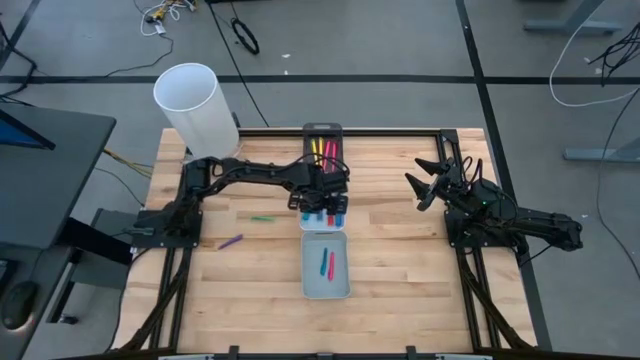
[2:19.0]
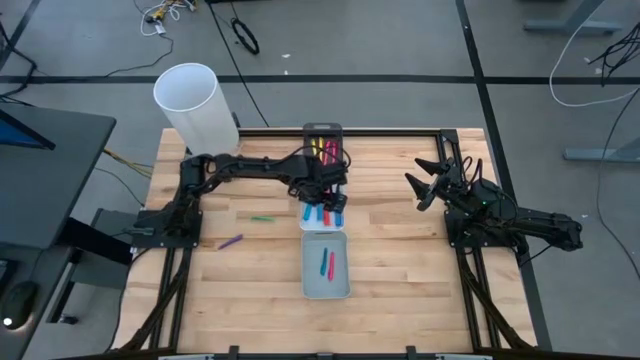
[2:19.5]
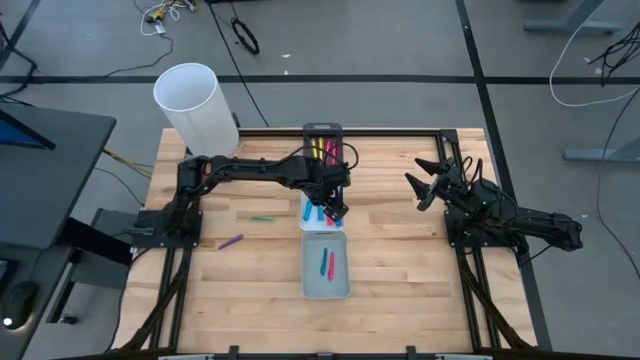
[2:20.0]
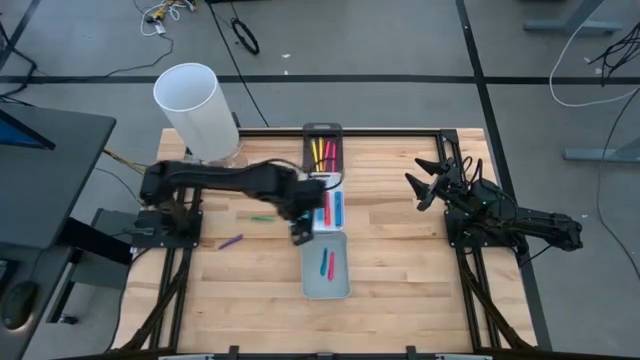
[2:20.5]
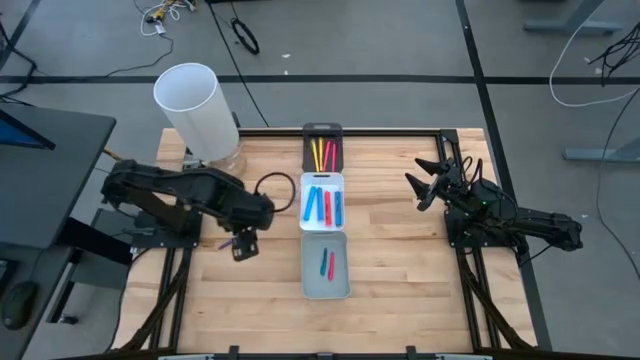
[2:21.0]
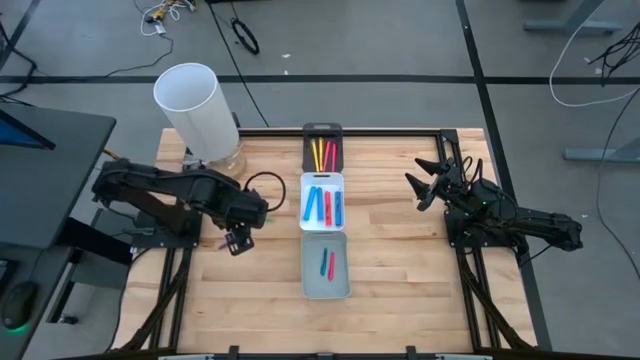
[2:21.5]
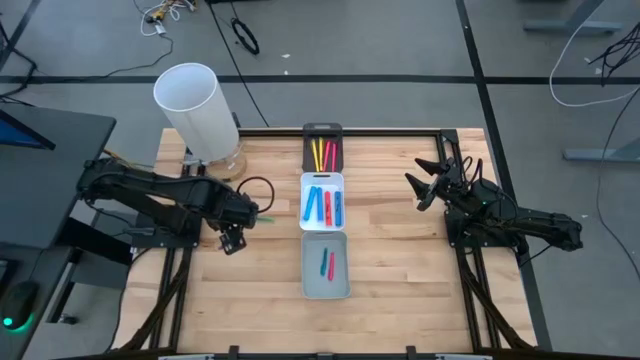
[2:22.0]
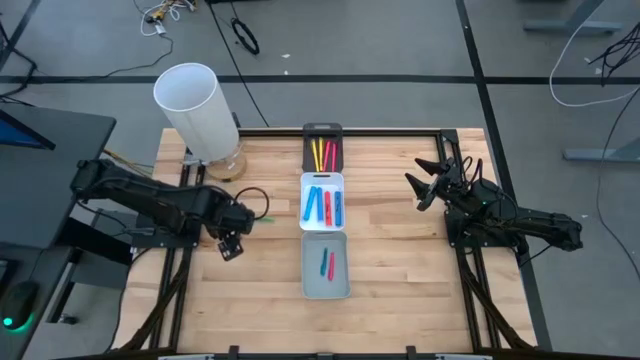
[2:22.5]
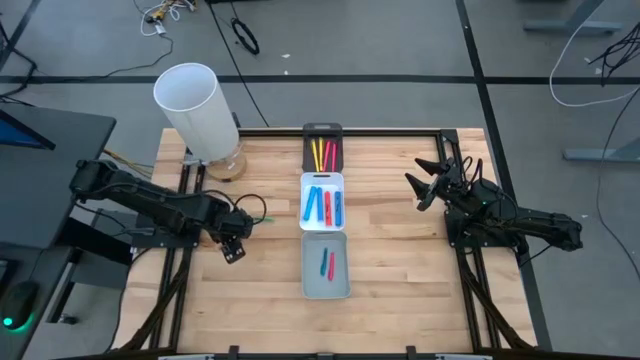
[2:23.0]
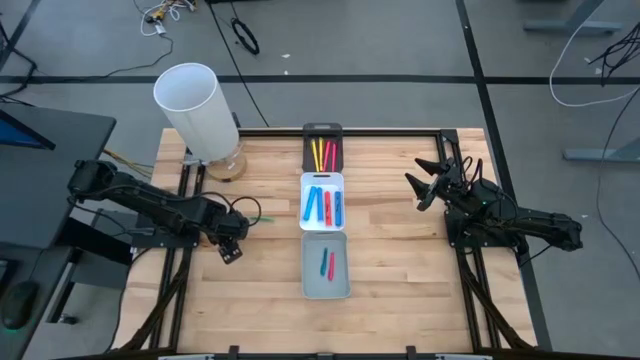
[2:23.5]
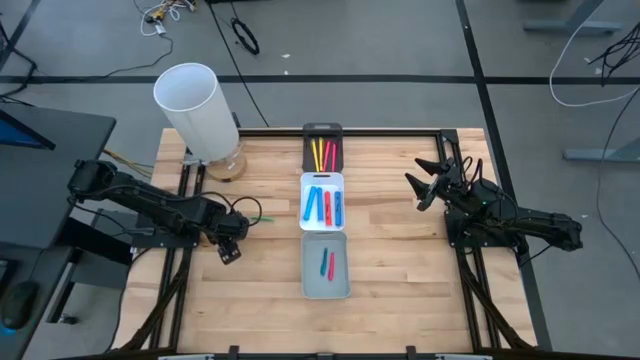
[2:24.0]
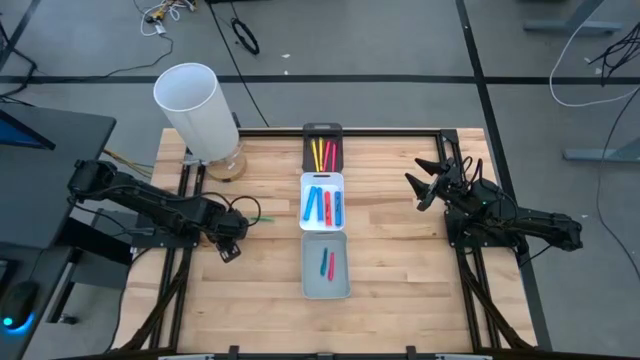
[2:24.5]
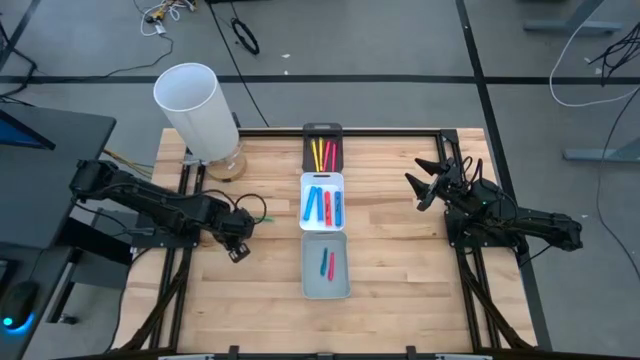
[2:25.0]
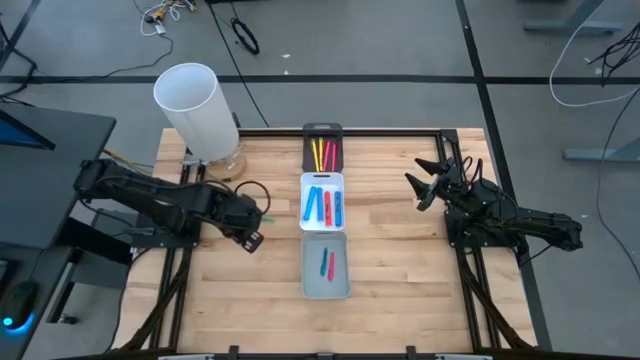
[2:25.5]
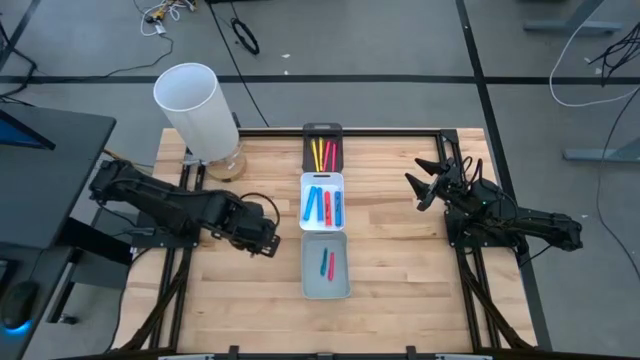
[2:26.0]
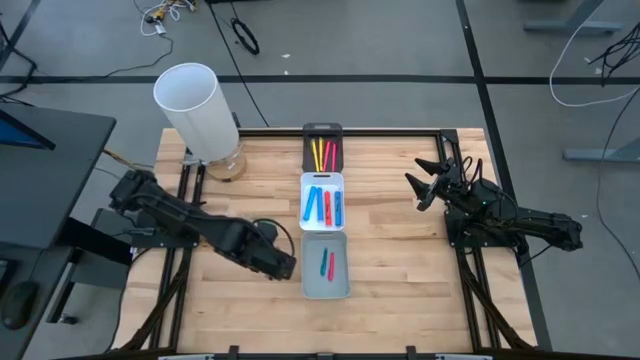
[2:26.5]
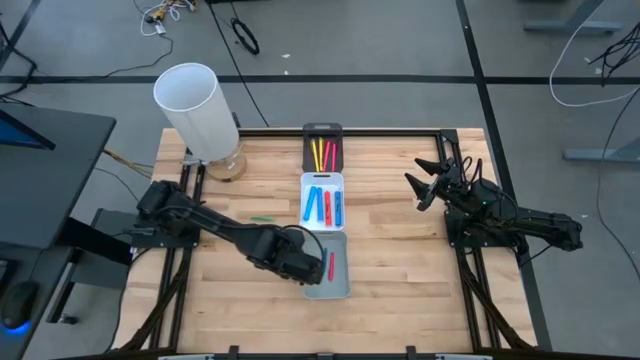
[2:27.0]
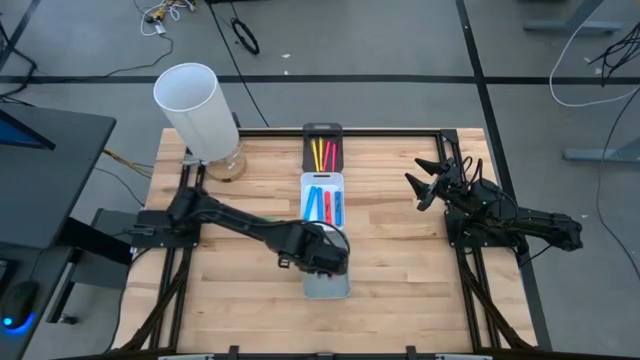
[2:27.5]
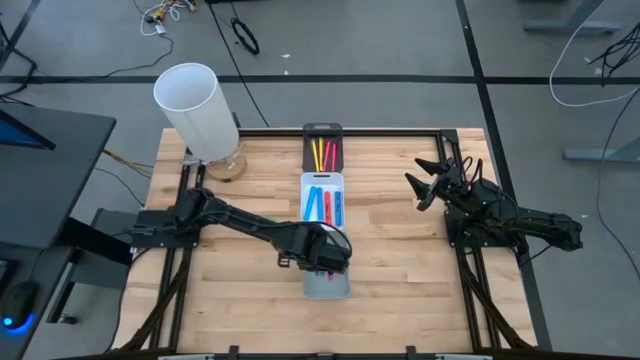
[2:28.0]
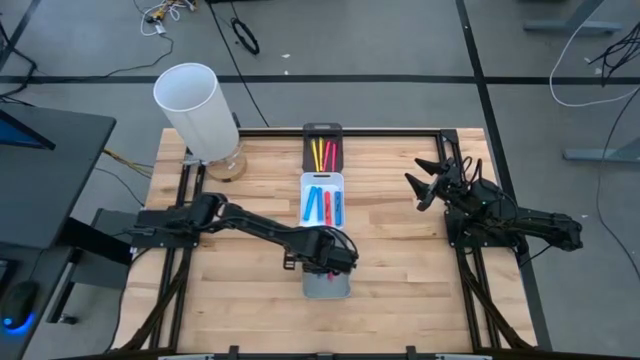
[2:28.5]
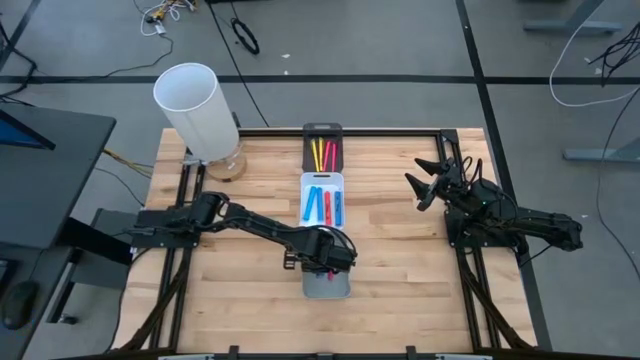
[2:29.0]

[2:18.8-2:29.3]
Task: Pick & Place Markers
Put the violet pen into the gray bin

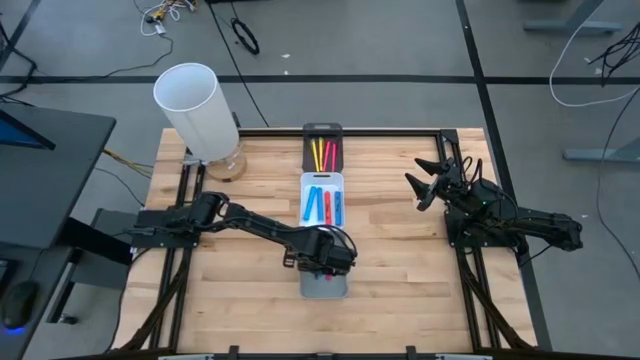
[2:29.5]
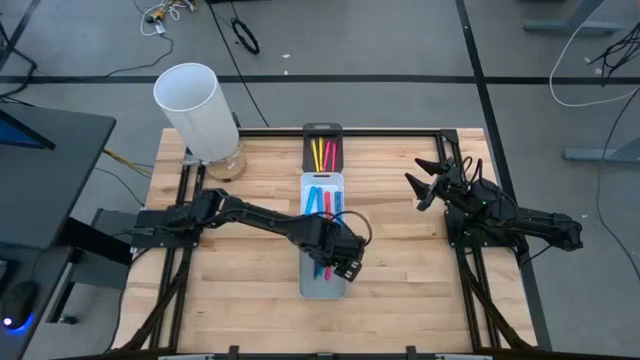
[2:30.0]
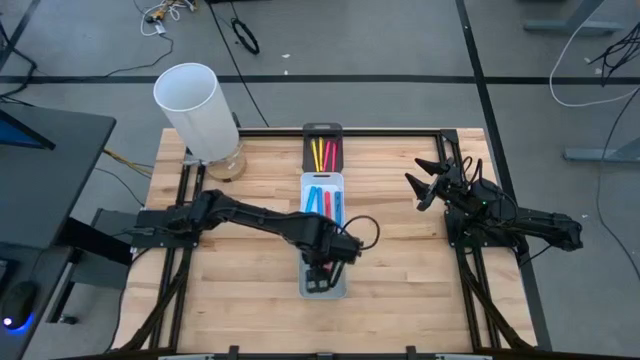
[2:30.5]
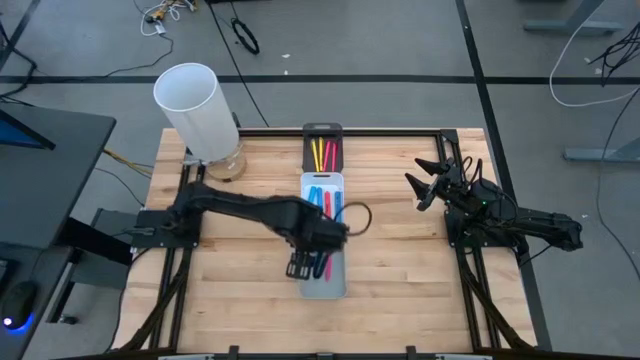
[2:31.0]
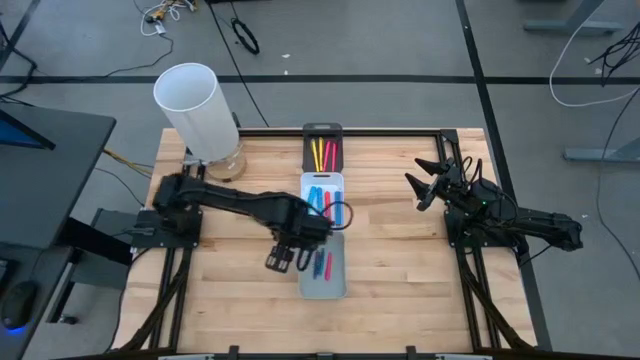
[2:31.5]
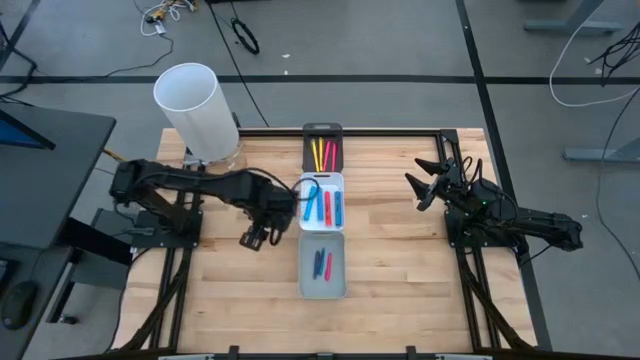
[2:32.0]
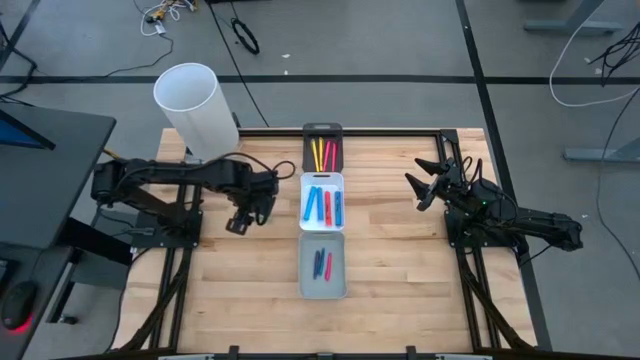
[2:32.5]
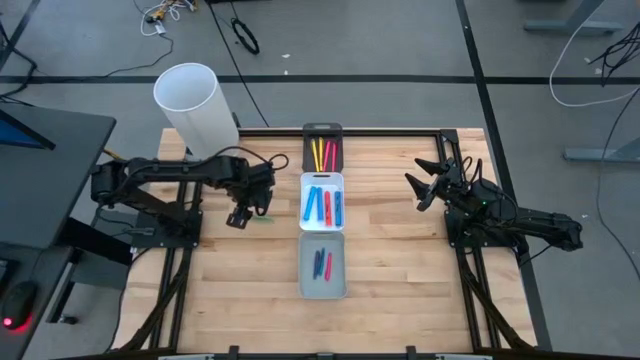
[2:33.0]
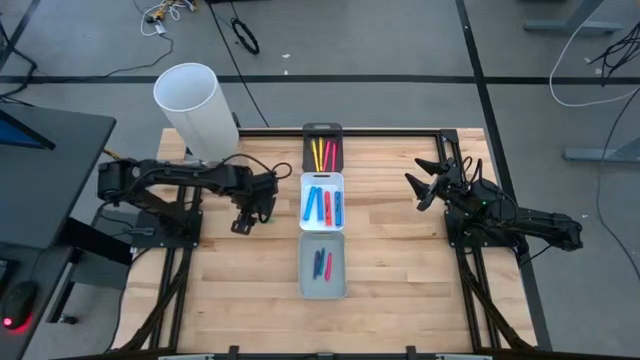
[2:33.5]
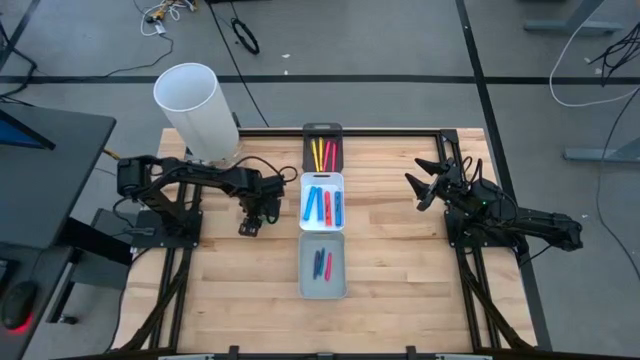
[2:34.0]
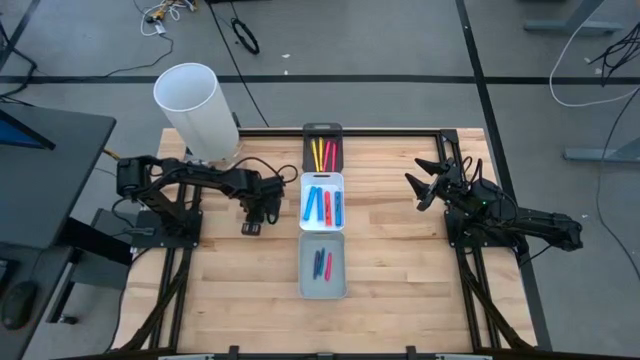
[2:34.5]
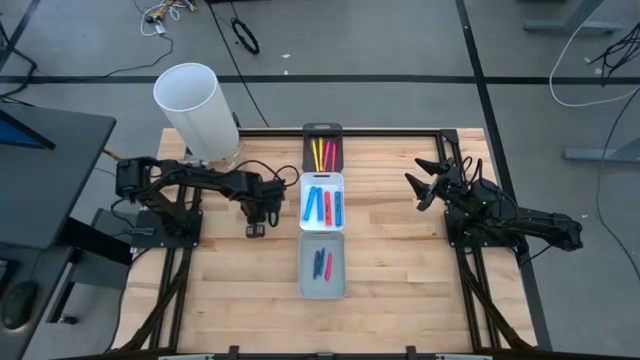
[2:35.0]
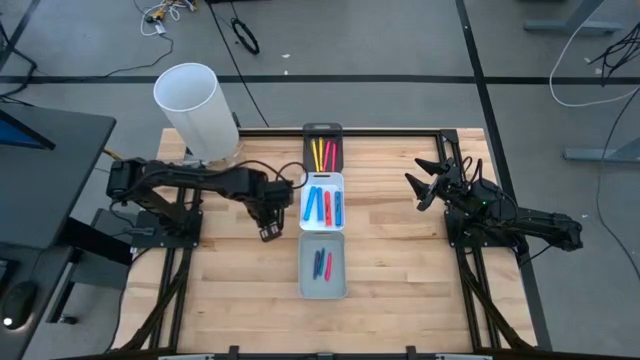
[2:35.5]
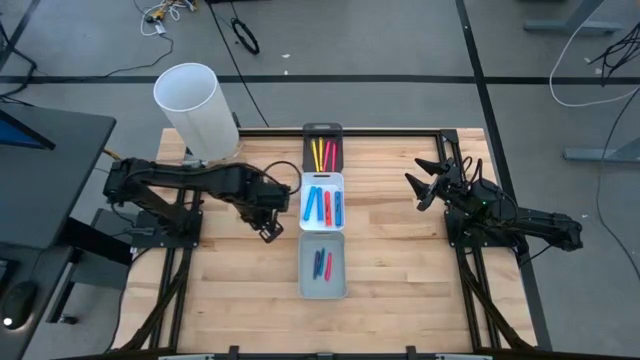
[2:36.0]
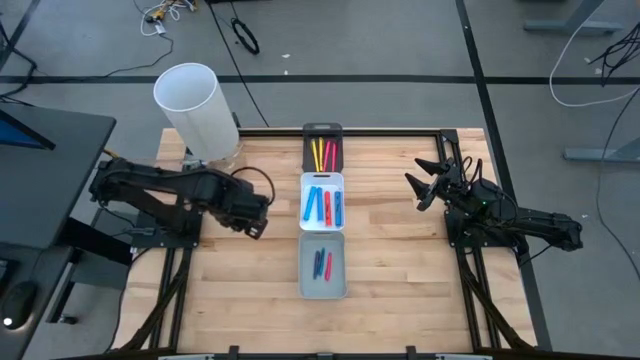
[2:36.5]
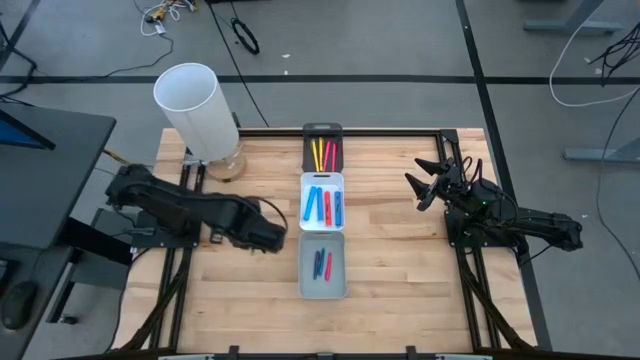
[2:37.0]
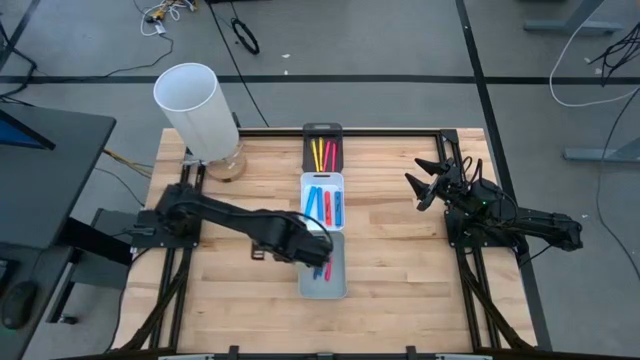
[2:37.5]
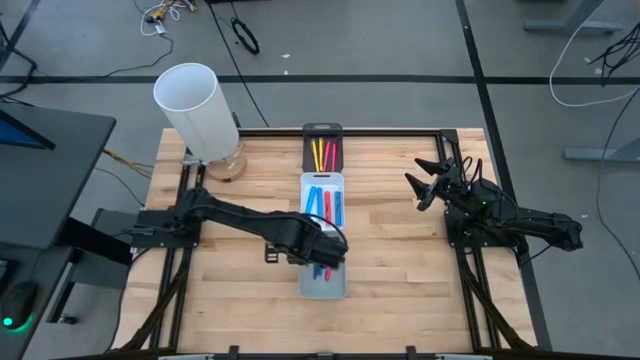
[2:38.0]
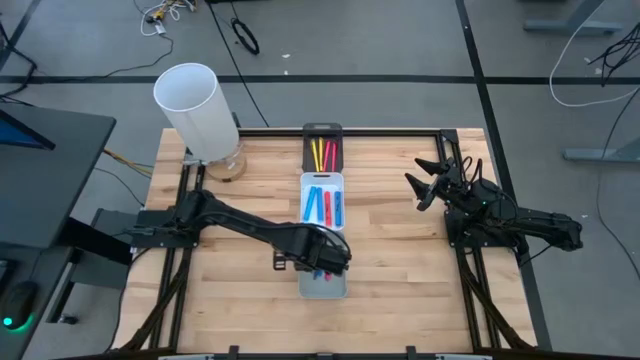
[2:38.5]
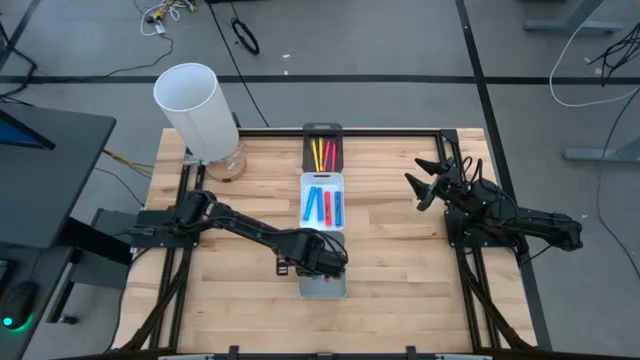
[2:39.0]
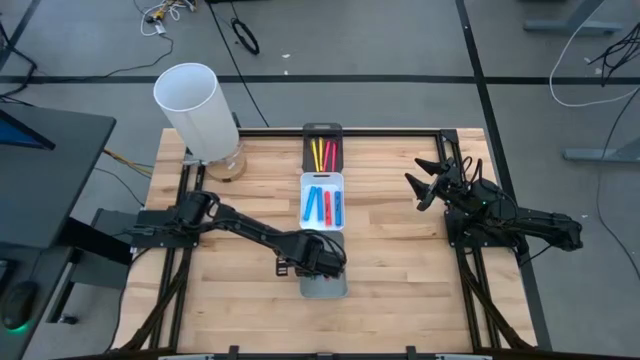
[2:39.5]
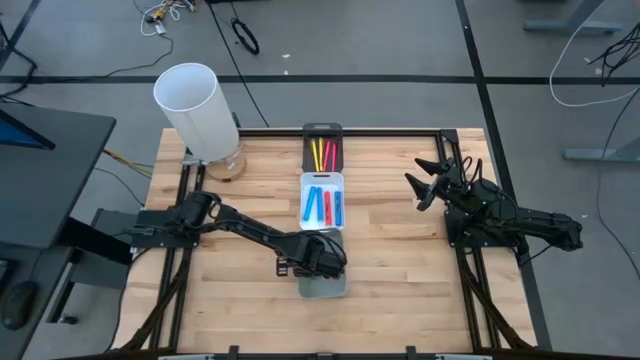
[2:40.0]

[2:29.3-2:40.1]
Put the green pen into the gray bin
